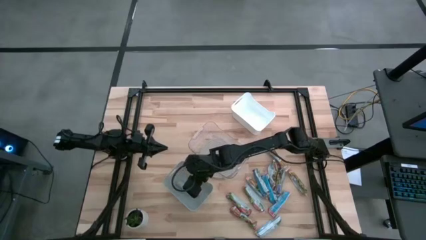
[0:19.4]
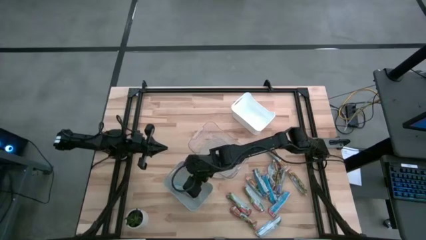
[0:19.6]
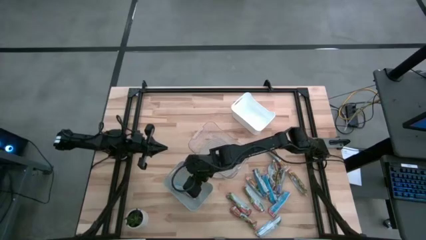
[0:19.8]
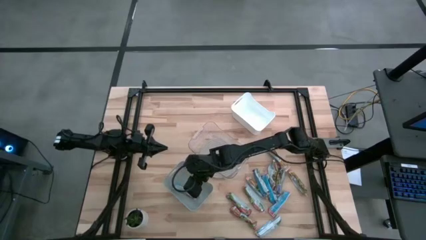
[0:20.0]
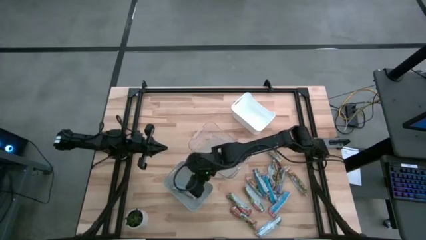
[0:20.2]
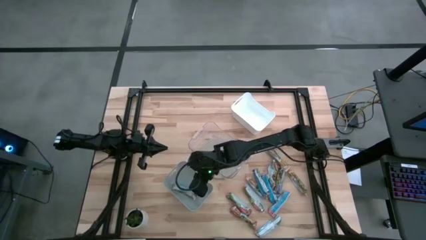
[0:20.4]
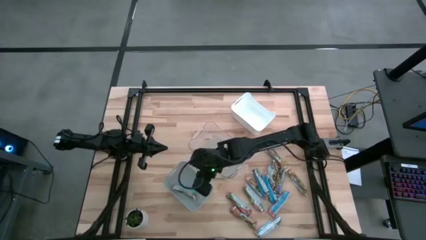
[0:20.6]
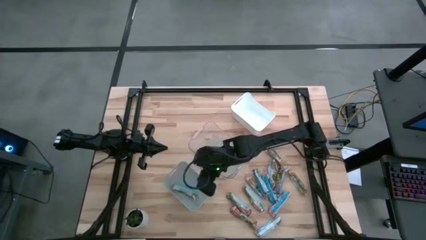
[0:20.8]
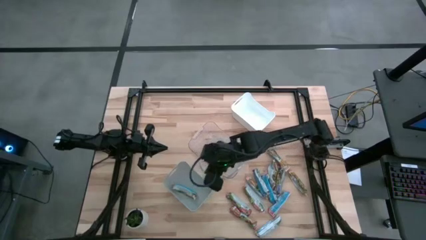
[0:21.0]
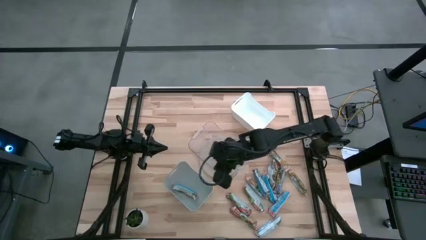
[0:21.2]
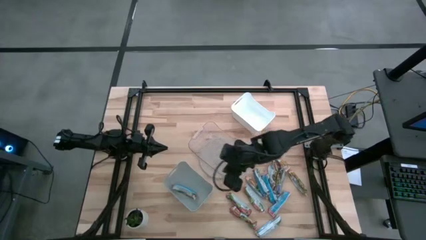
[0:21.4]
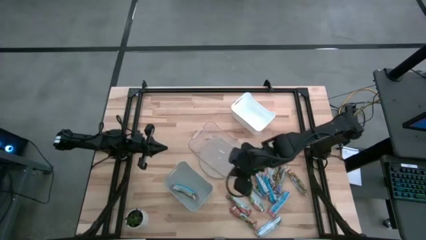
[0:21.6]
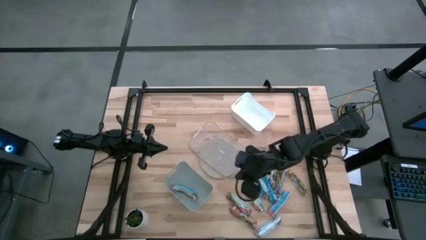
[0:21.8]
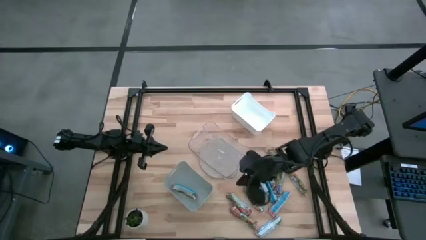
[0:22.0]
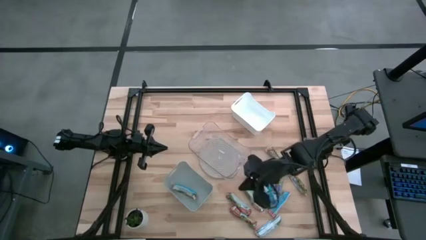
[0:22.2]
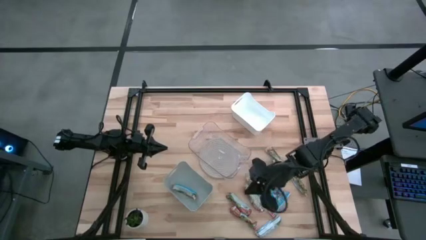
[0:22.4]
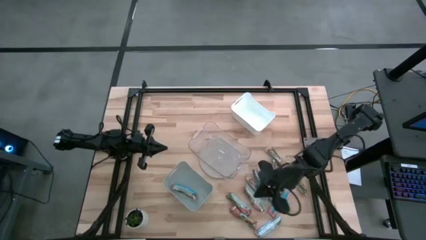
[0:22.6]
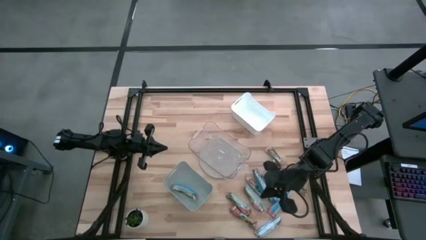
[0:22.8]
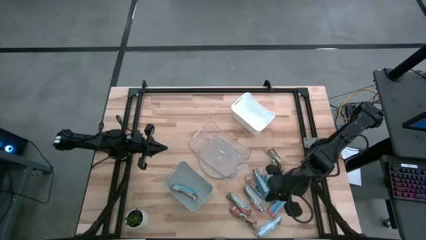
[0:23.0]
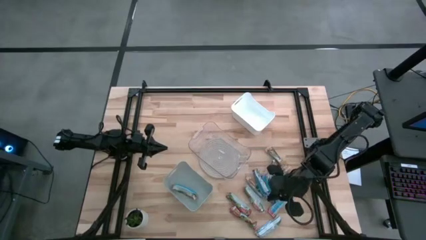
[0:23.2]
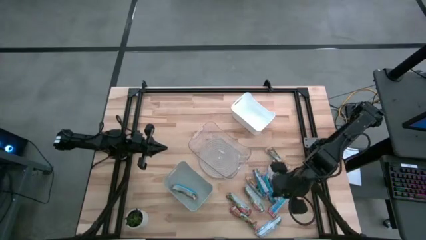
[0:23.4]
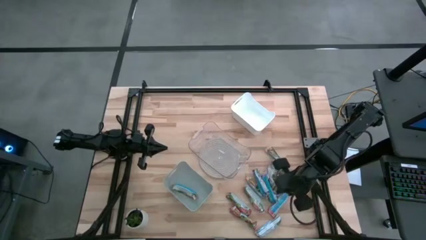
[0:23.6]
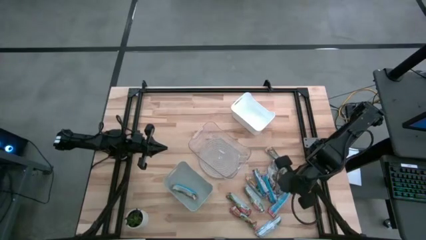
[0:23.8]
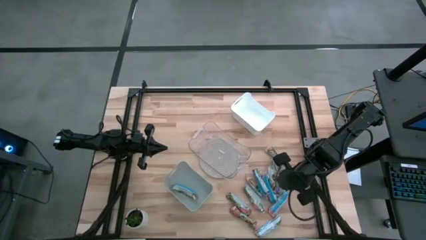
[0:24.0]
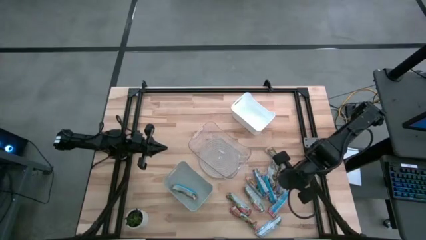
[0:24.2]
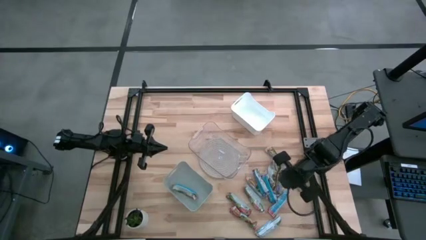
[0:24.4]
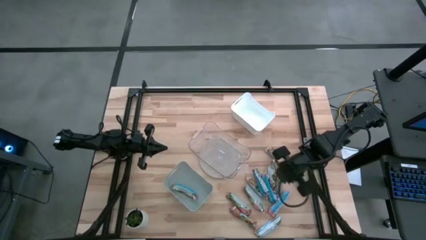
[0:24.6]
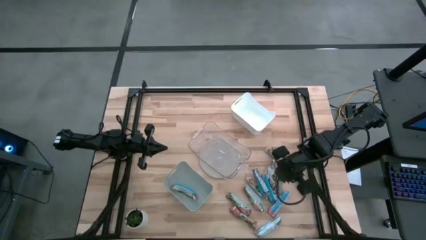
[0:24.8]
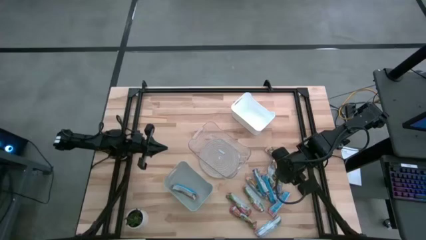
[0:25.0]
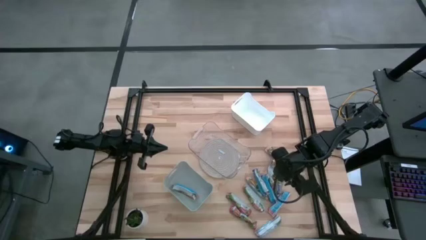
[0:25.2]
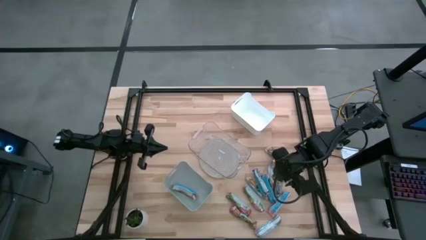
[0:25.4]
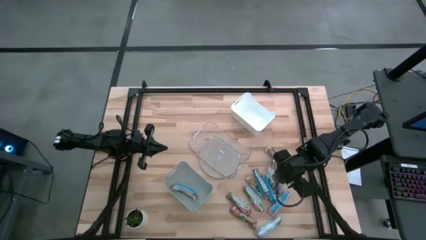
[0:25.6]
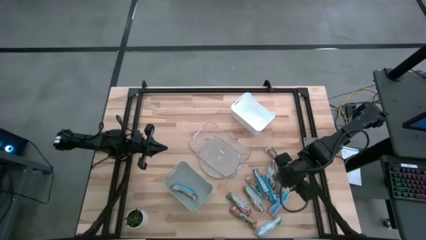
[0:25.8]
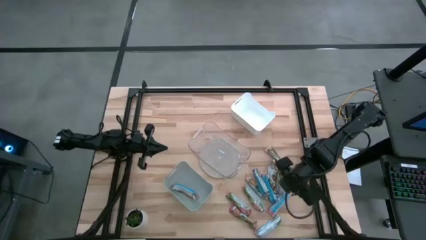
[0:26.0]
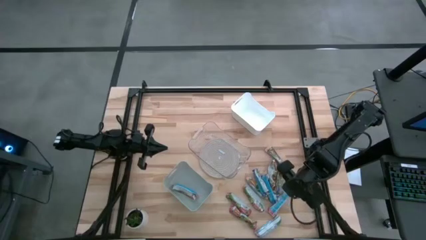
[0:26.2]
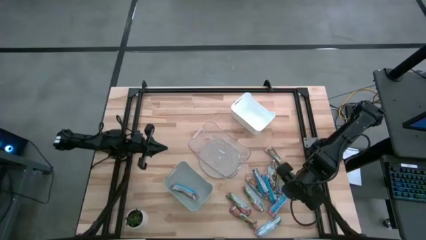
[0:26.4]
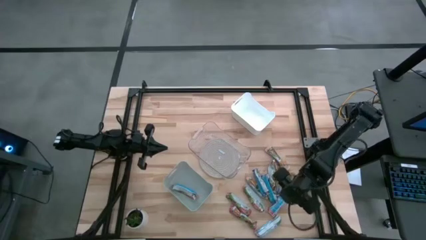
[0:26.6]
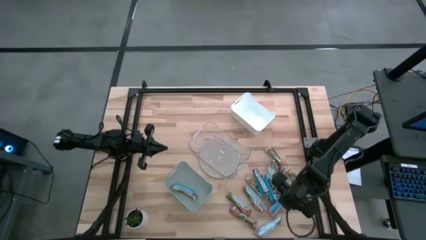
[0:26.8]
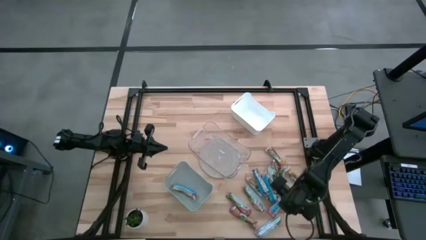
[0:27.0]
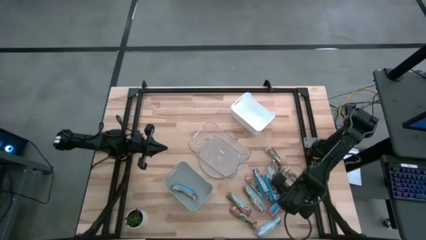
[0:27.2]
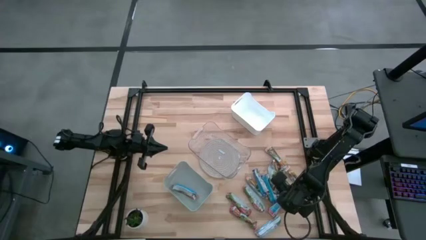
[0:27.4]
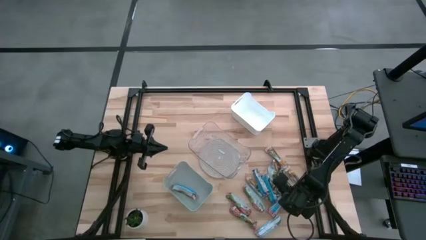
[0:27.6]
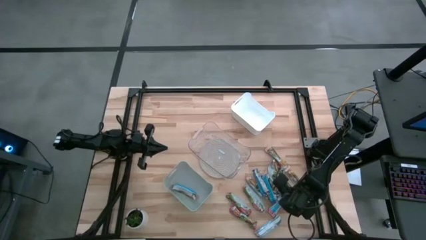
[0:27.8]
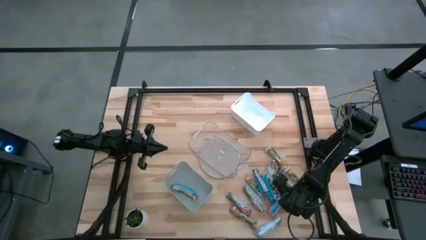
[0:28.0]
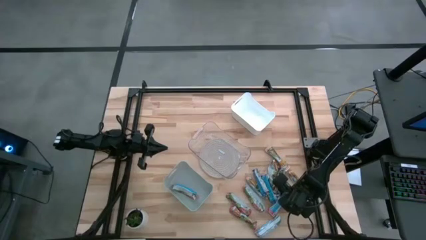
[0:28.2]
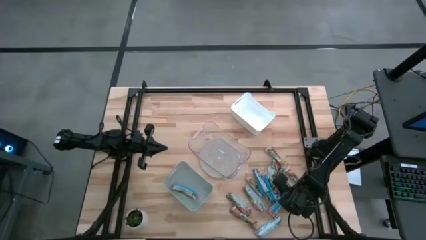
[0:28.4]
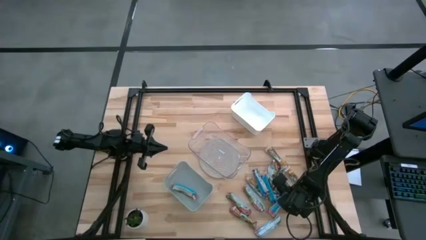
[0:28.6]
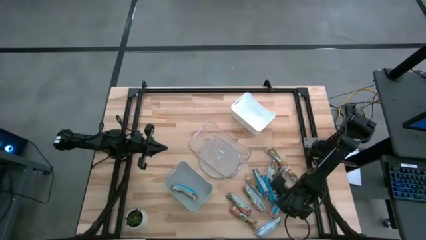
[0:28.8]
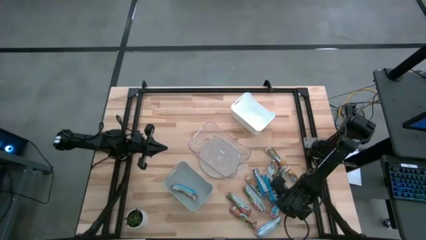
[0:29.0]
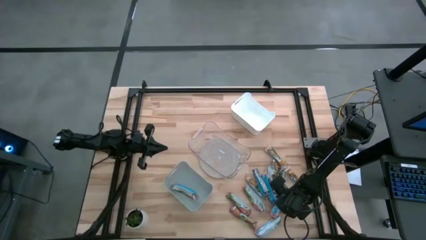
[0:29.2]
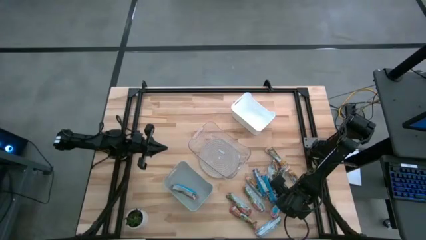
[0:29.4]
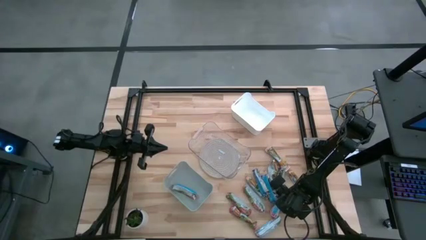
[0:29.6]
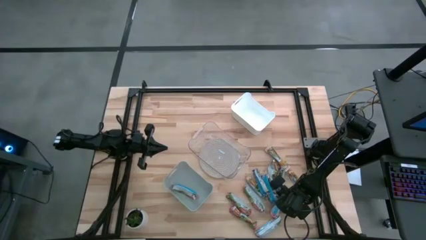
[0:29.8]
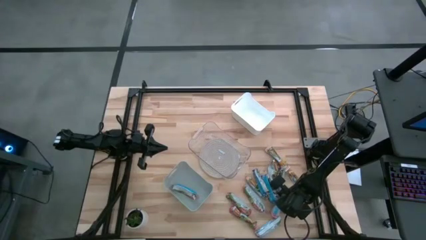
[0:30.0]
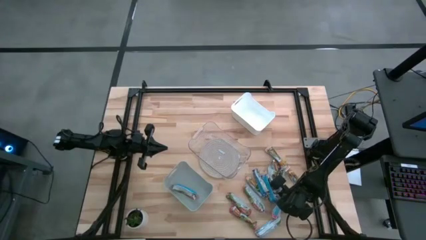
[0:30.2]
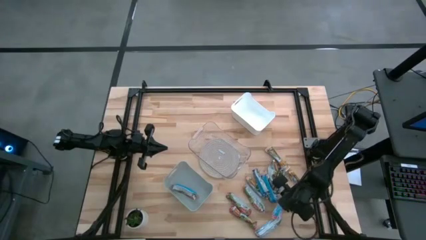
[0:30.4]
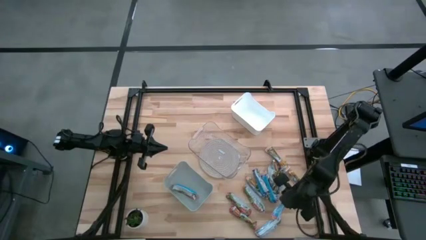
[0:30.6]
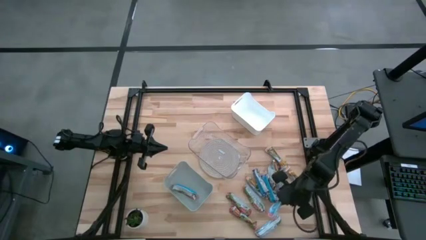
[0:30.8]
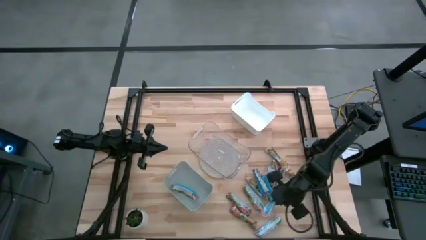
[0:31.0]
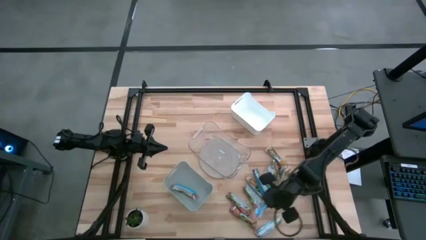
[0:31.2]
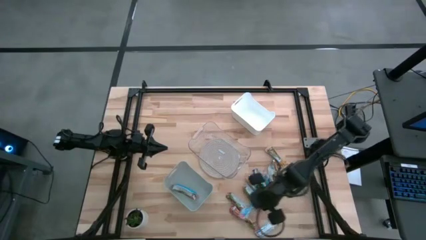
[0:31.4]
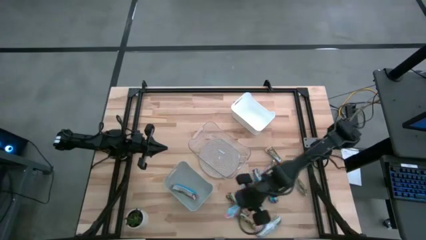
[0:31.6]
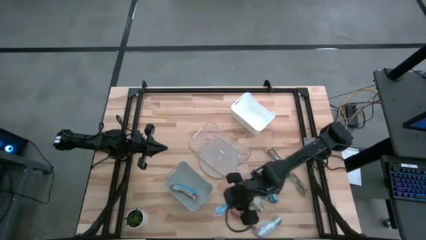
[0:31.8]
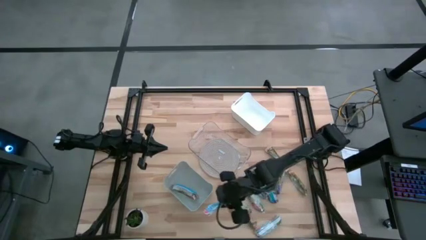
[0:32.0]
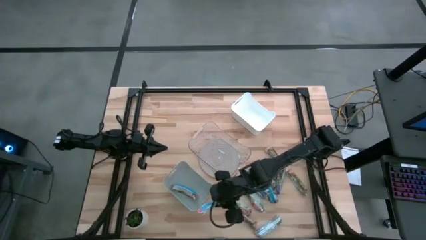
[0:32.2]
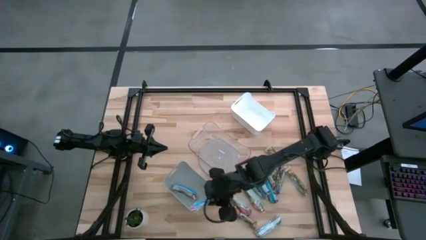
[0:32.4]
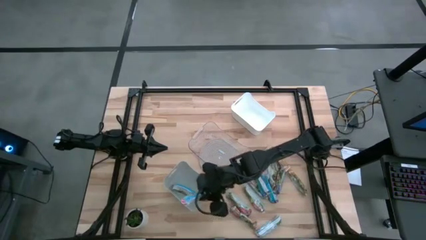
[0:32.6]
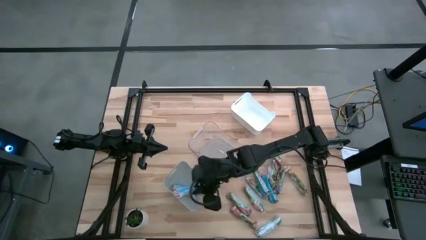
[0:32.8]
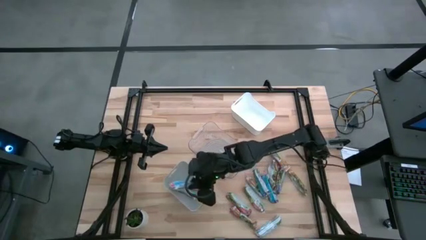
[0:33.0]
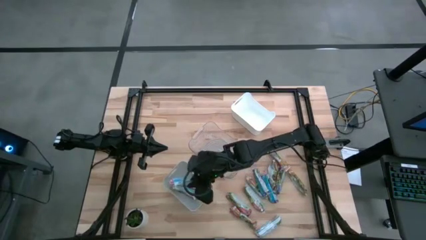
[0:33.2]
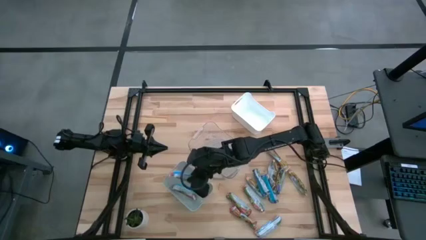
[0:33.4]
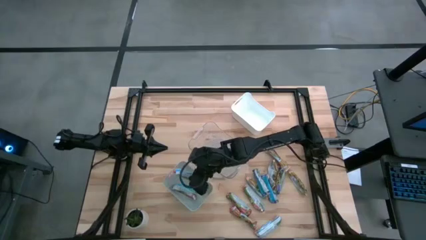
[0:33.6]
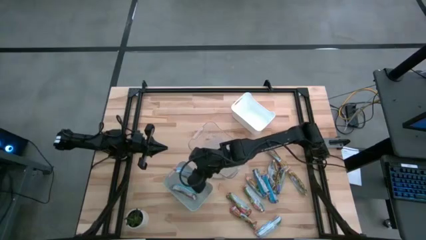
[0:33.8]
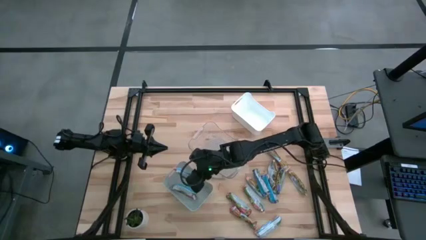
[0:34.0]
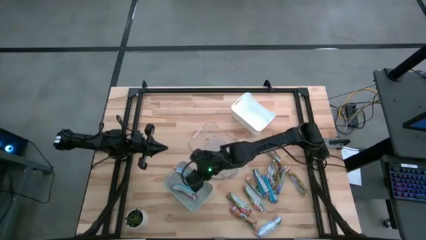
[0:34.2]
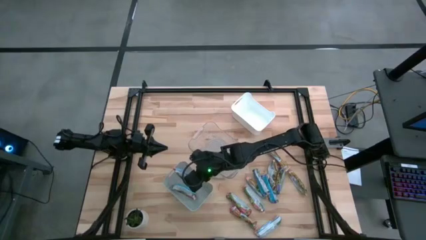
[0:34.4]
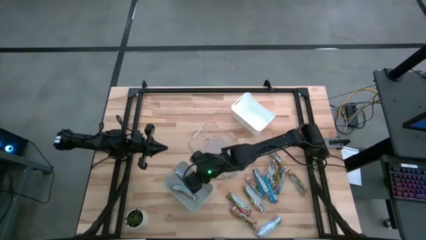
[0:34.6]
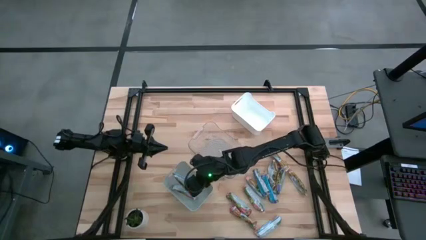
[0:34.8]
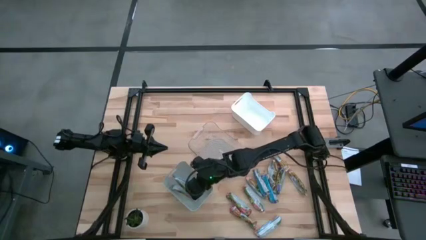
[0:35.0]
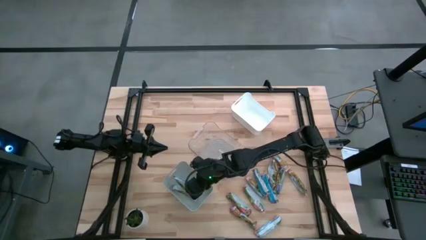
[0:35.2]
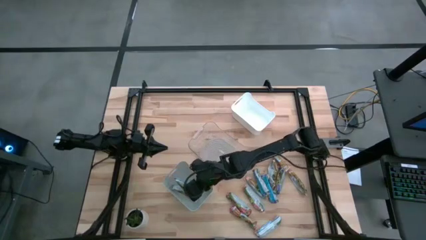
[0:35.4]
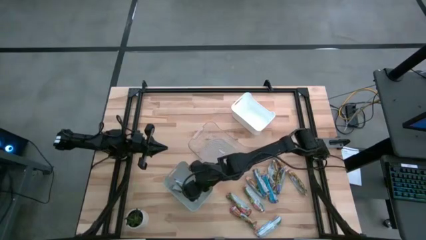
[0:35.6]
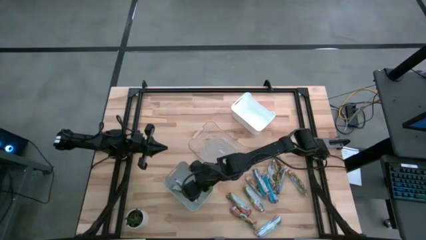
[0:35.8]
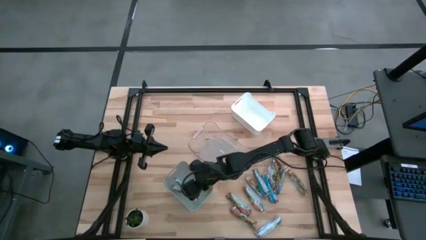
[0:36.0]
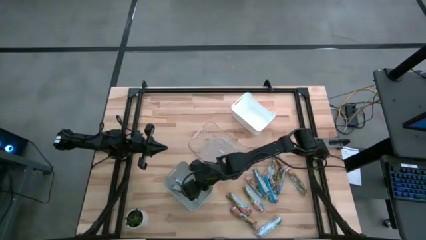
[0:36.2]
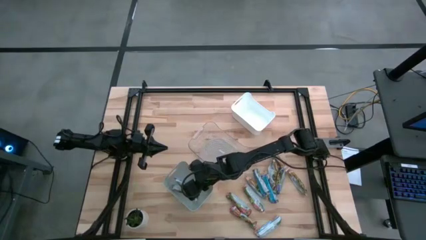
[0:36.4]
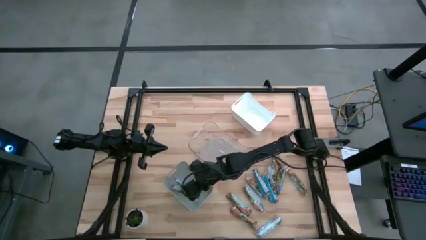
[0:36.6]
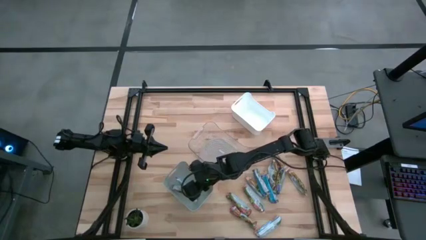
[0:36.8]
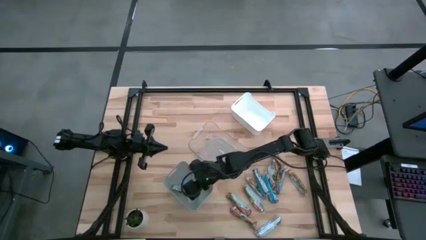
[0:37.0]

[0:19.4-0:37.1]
Task: Pick and place Granola Bars by type
Put the red granola bar into the gray bin
